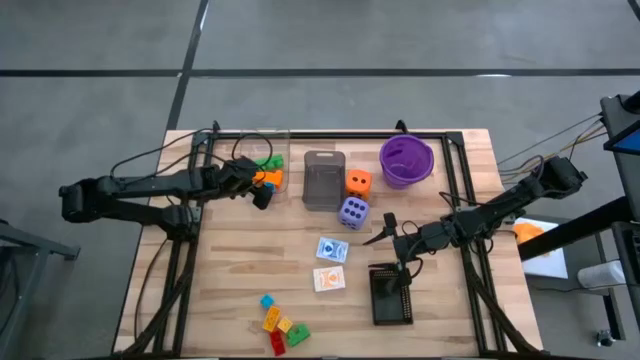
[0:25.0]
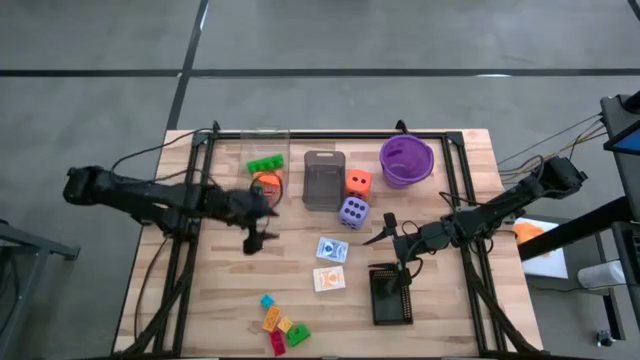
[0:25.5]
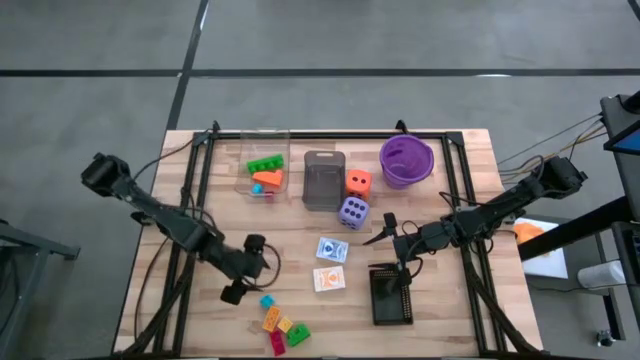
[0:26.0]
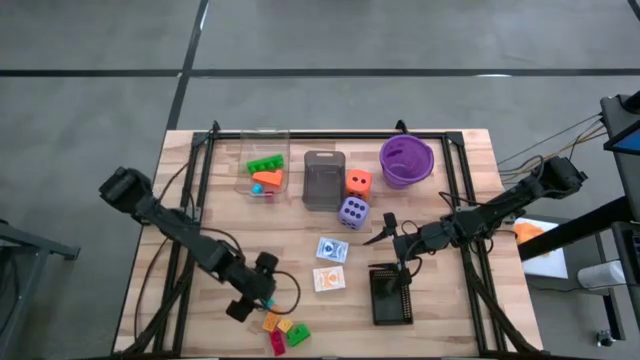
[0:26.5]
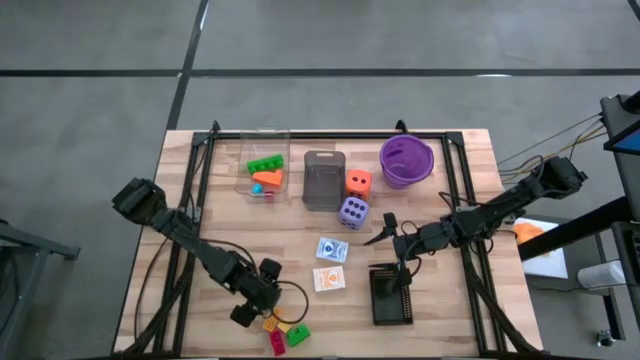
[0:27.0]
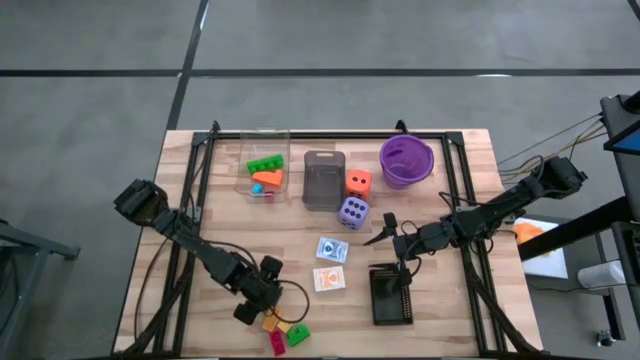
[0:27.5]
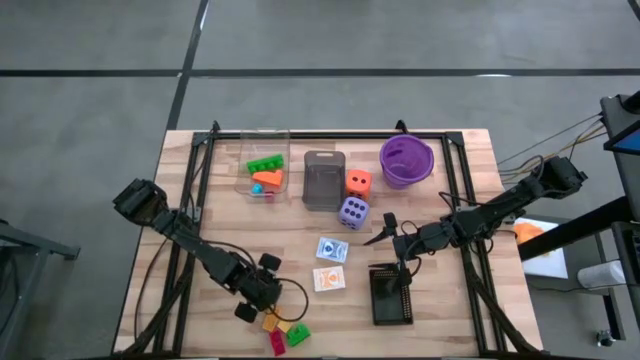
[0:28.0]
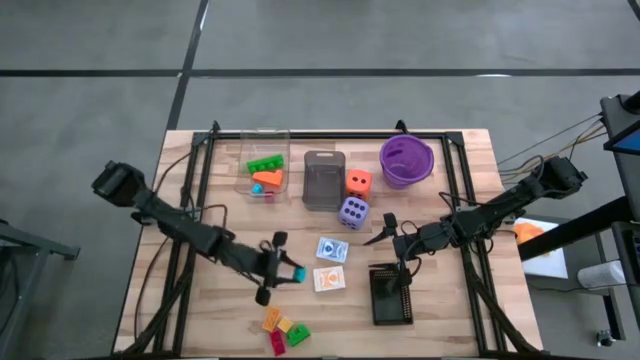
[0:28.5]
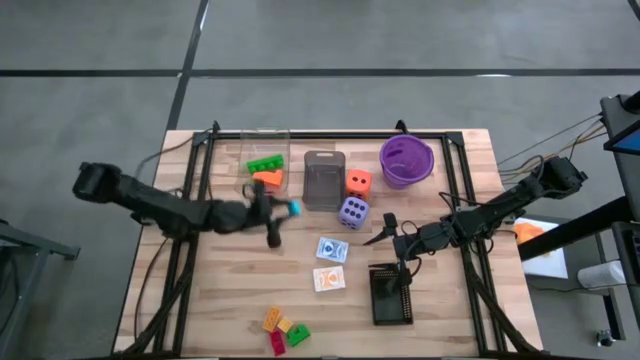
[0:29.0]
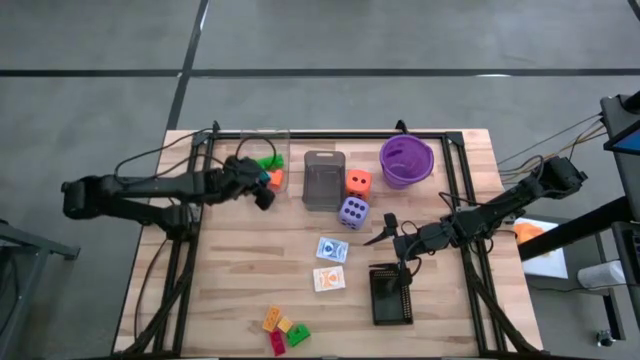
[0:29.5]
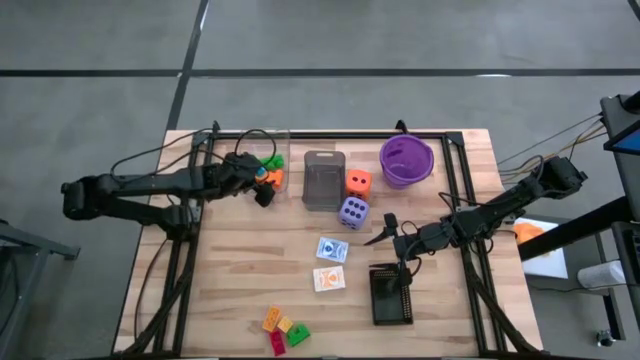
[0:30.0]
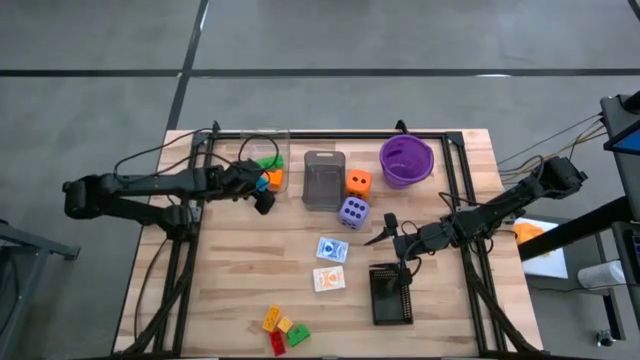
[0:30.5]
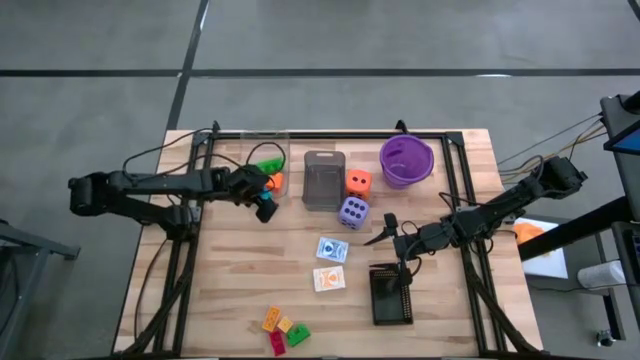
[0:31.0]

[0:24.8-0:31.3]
Task: Pick & Place Toys
Put the blue game piece into the transparent bin

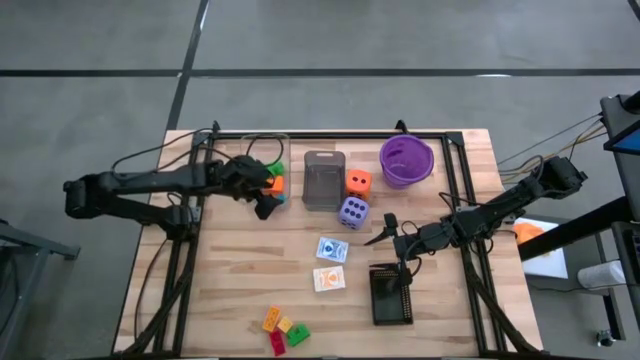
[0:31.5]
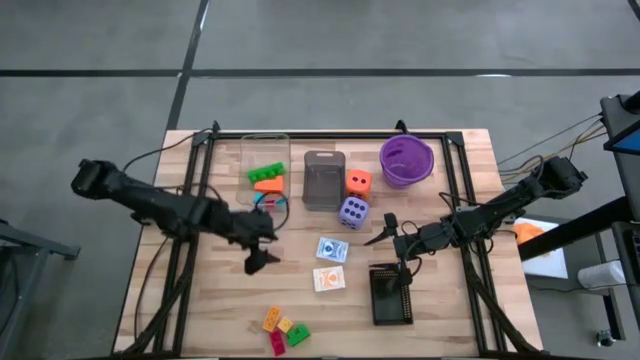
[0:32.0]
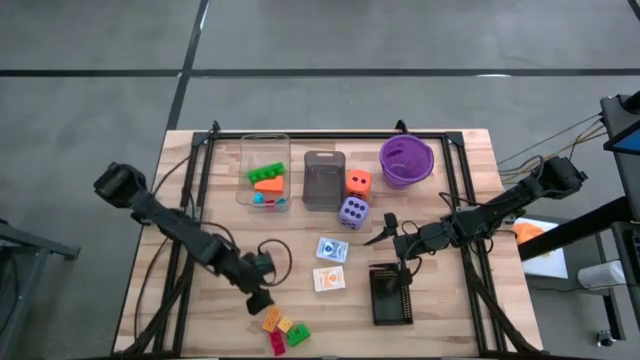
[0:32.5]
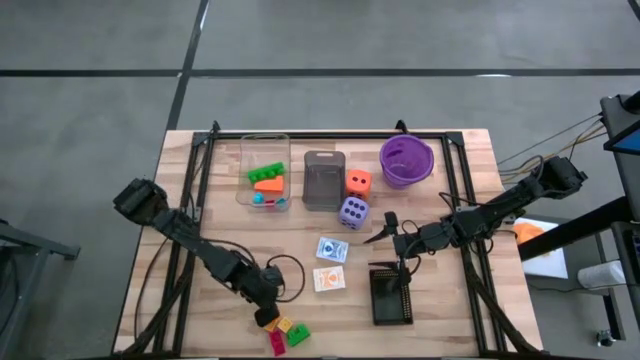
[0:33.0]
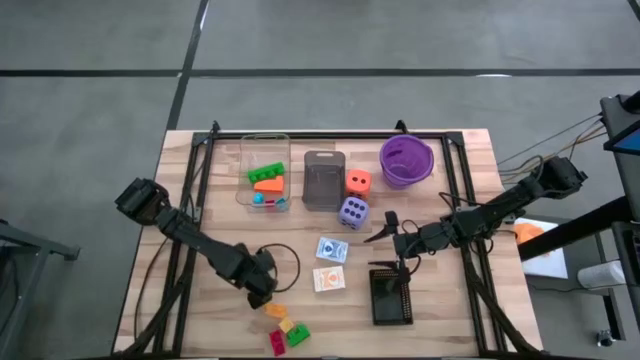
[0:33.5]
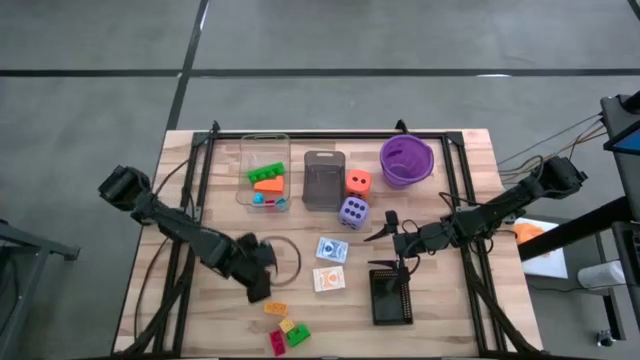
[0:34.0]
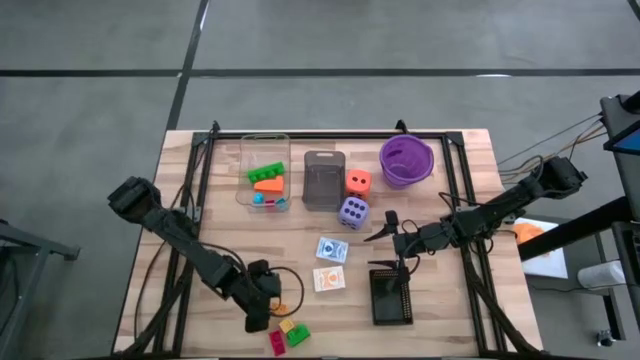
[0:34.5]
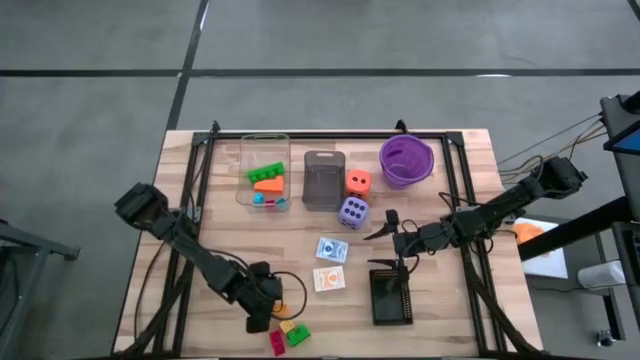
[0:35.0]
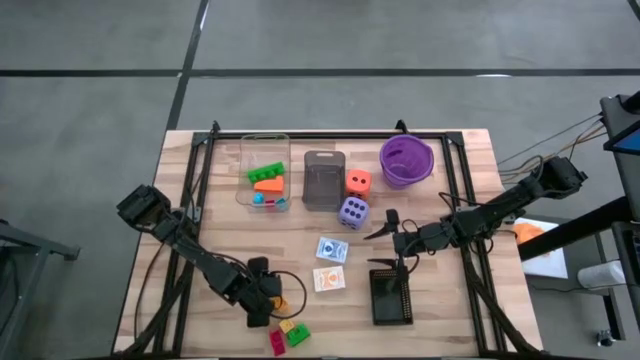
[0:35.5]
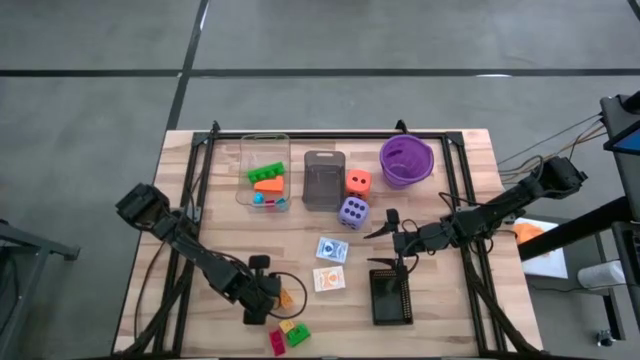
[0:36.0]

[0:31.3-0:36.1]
Put the yellow game piece into the transparent bin

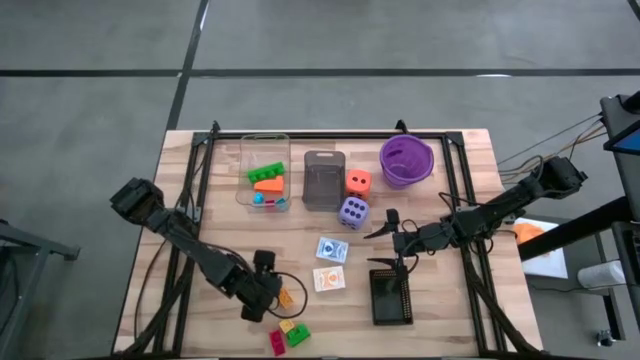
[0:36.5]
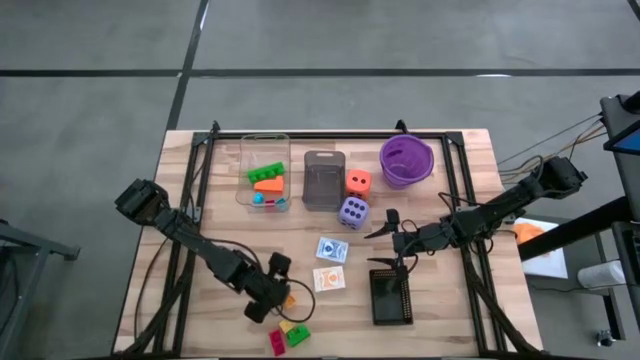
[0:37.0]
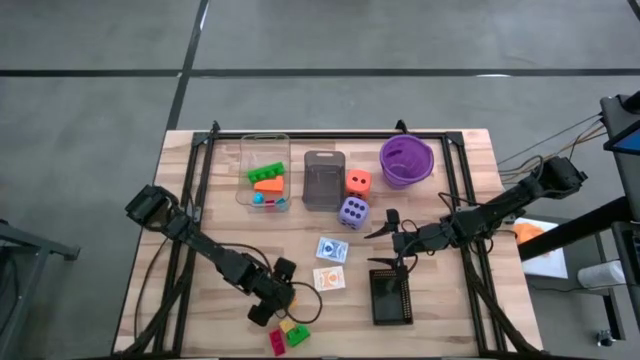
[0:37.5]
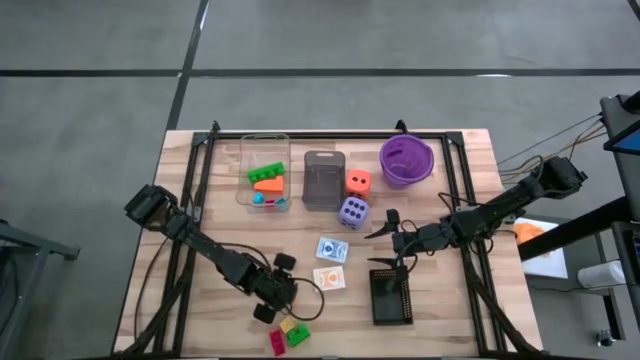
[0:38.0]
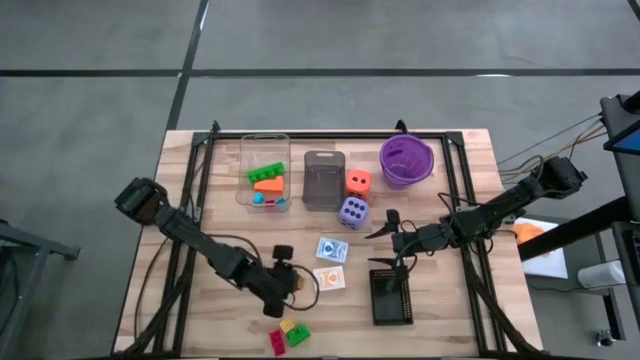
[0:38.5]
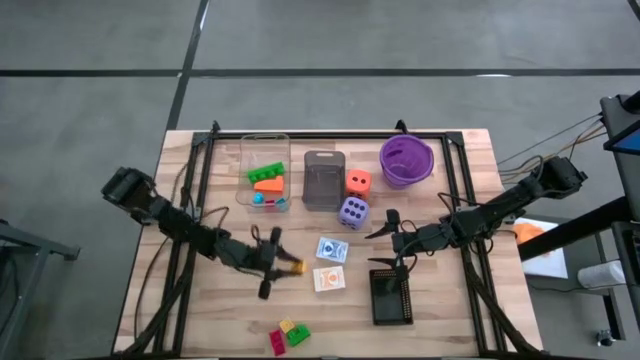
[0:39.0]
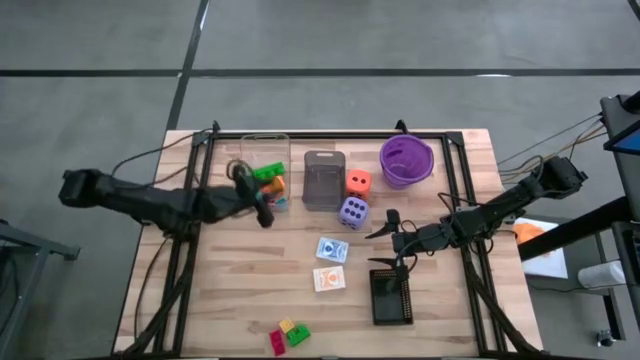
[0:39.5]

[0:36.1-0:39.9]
Put the yellow game piece into the transparent bin

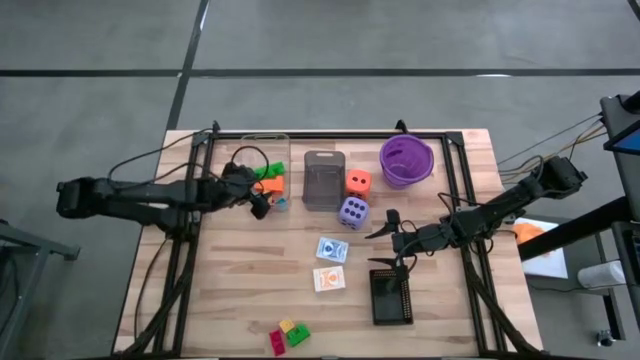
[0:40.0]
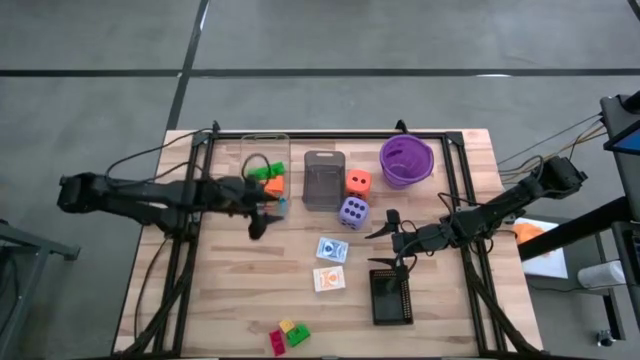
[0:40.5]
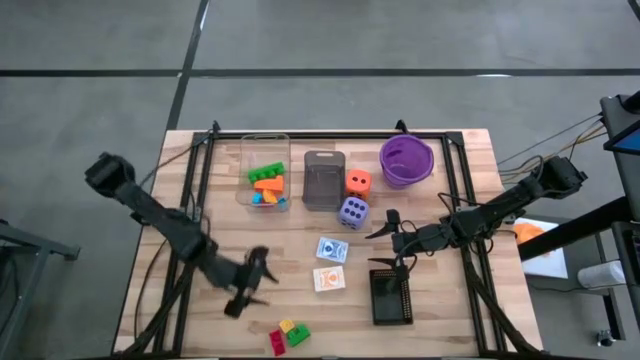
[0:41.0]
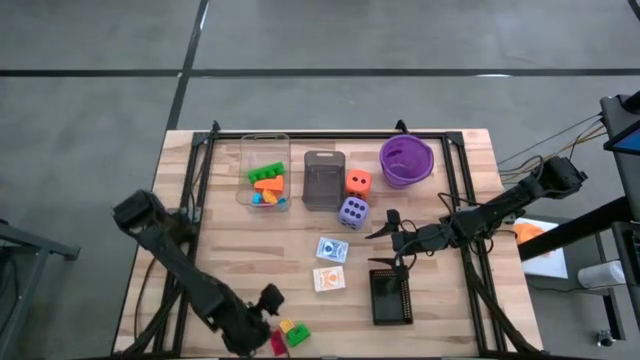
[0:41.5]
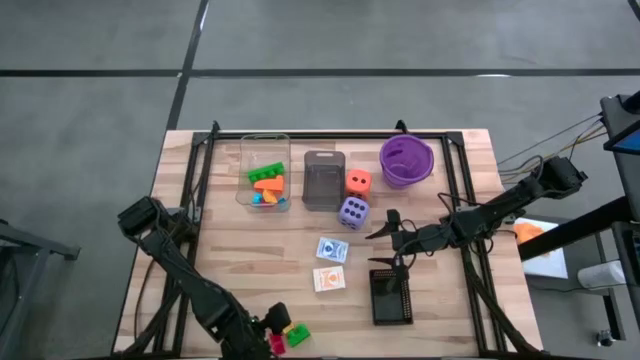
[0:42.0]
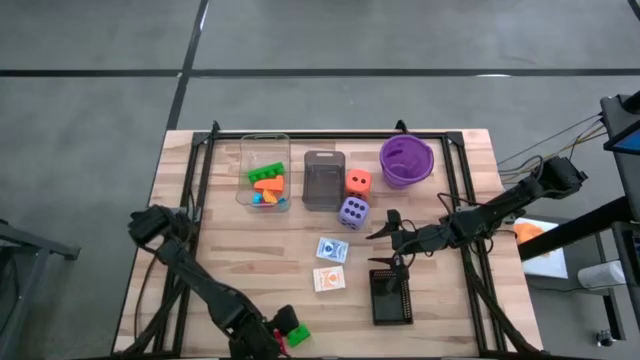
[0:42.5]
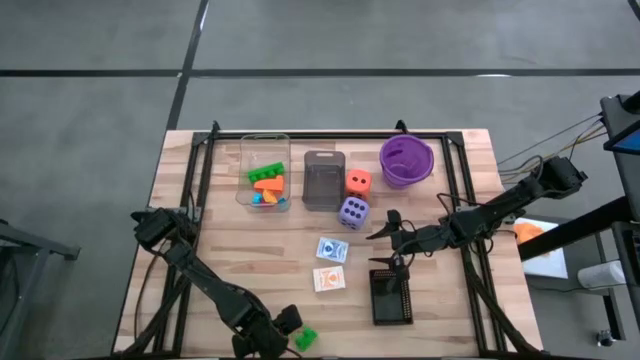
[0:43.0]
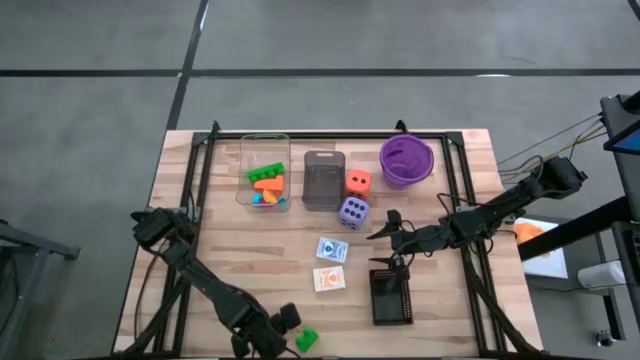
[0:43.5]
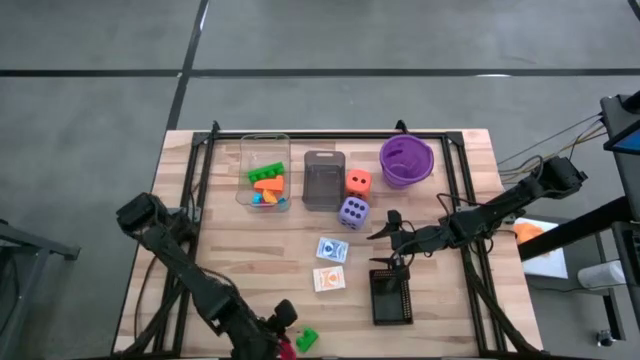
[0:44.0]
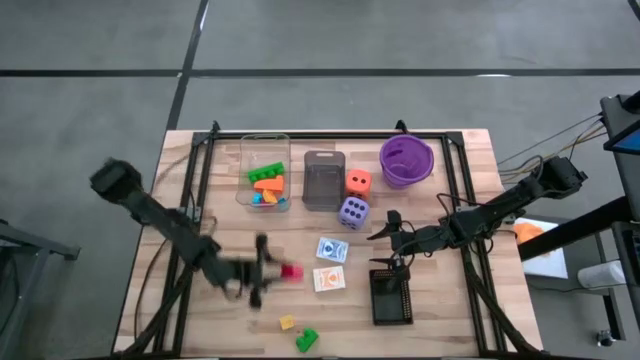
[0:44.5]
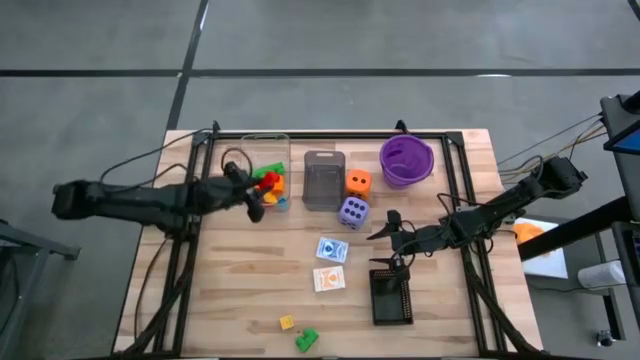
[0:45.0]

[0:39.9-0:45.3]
Put the red game piece into the transparent bin
